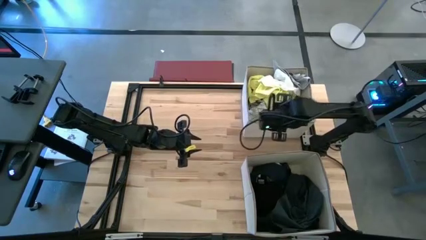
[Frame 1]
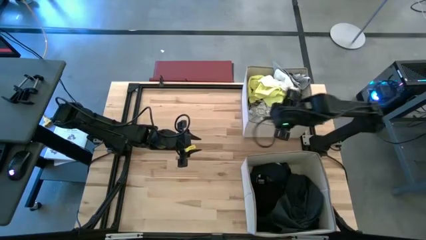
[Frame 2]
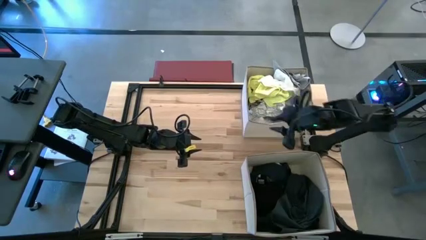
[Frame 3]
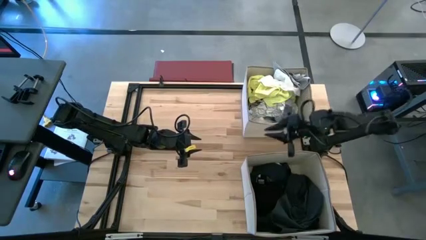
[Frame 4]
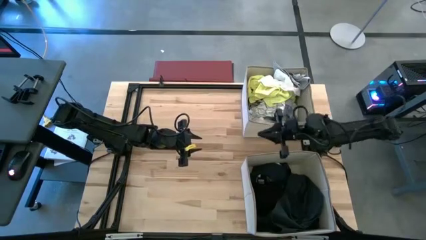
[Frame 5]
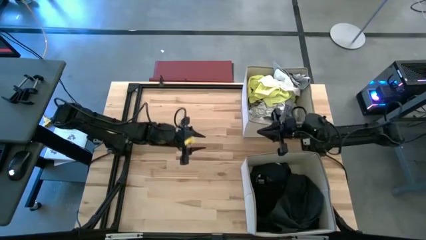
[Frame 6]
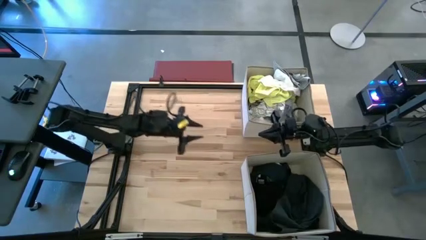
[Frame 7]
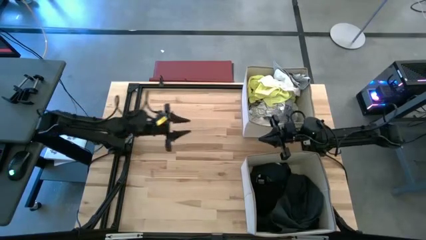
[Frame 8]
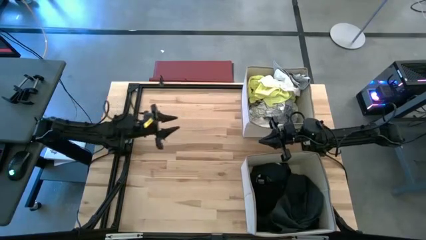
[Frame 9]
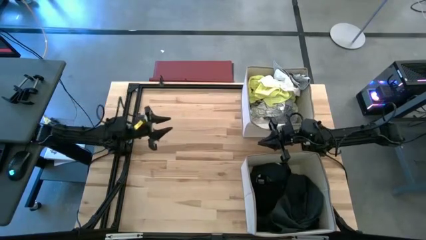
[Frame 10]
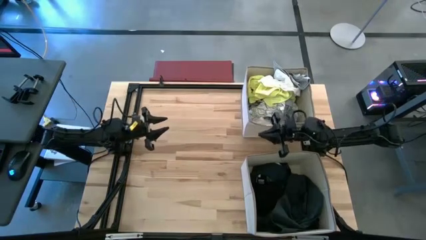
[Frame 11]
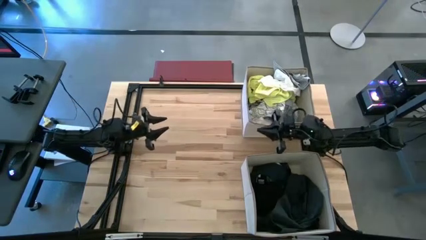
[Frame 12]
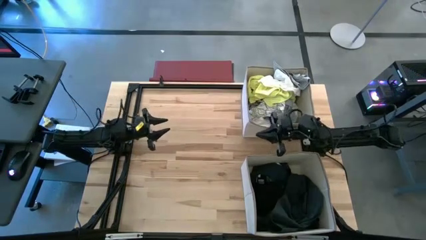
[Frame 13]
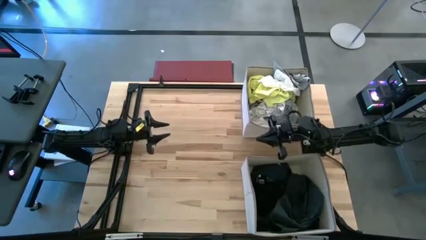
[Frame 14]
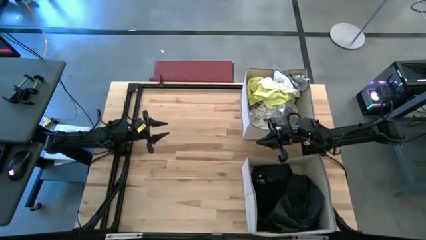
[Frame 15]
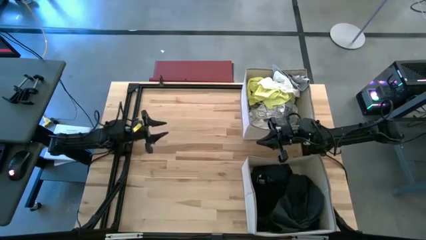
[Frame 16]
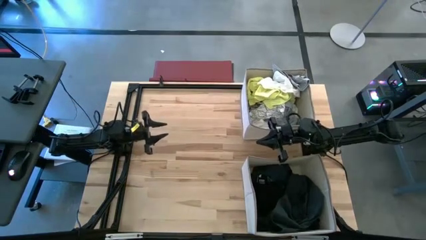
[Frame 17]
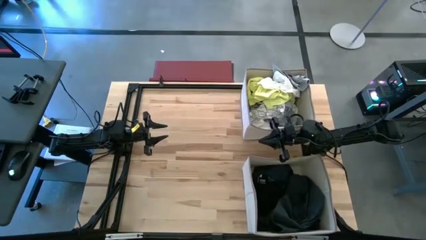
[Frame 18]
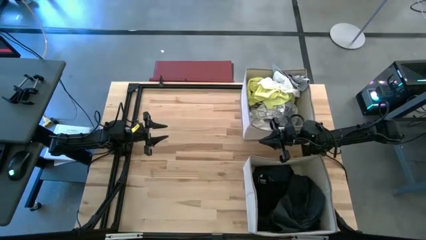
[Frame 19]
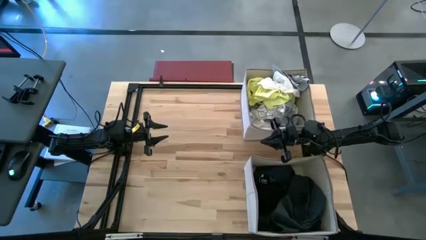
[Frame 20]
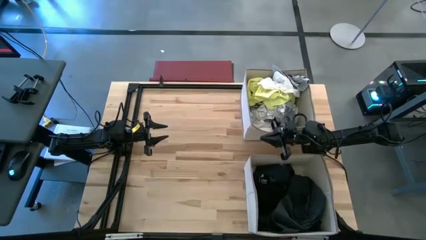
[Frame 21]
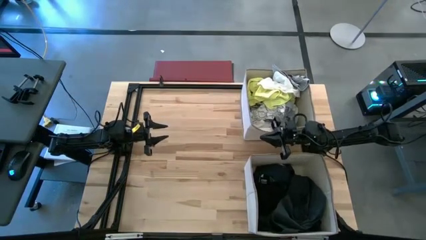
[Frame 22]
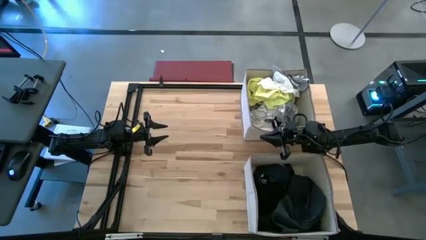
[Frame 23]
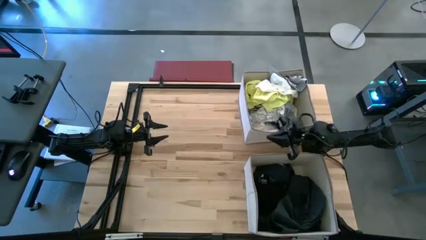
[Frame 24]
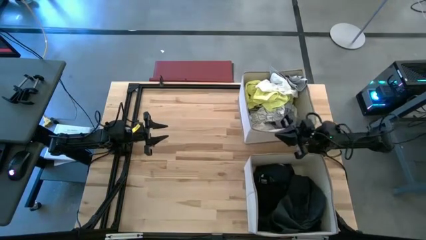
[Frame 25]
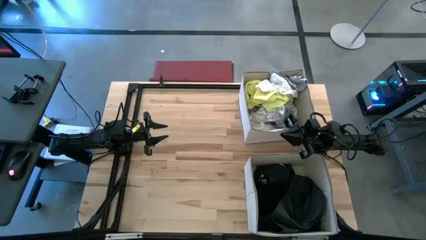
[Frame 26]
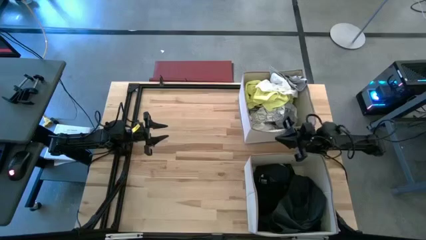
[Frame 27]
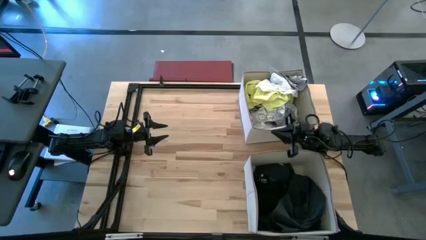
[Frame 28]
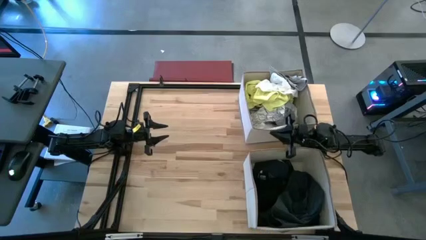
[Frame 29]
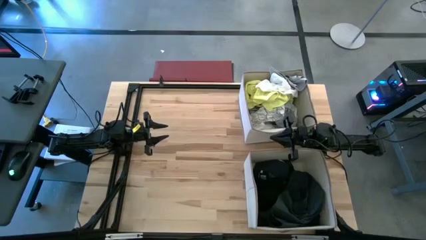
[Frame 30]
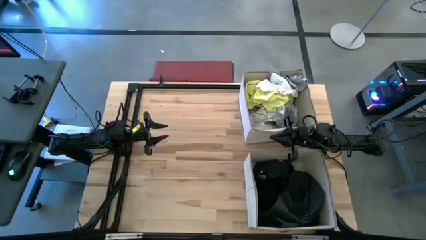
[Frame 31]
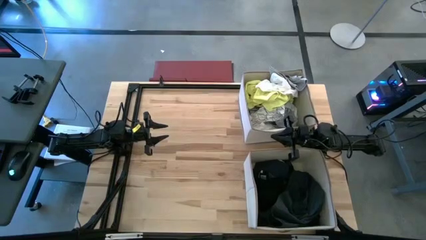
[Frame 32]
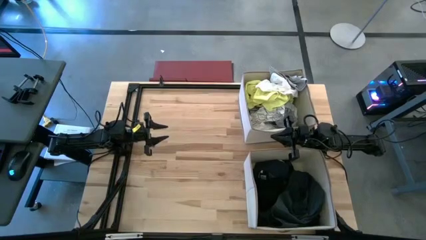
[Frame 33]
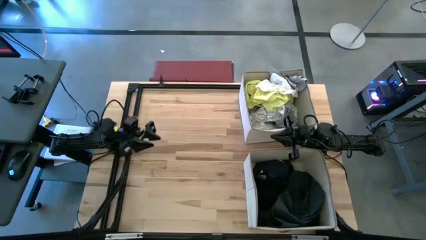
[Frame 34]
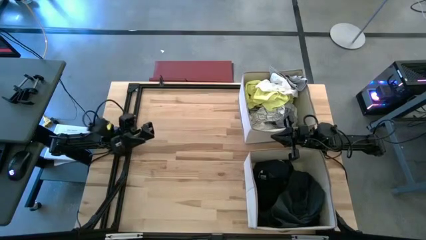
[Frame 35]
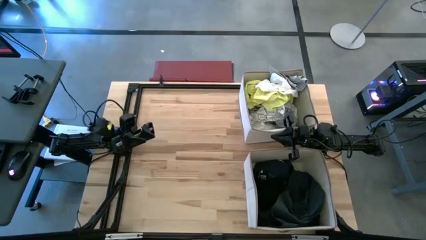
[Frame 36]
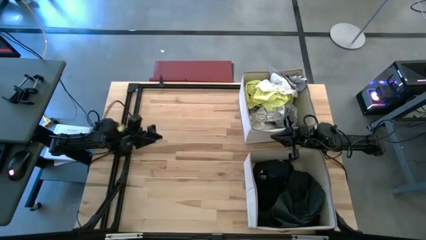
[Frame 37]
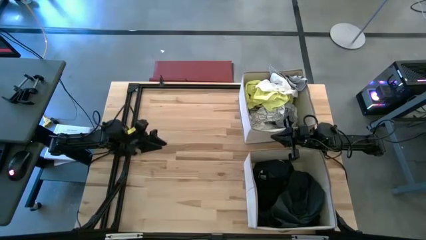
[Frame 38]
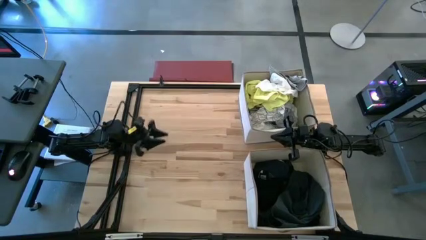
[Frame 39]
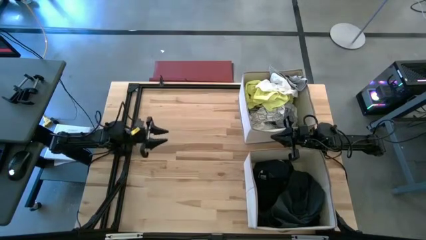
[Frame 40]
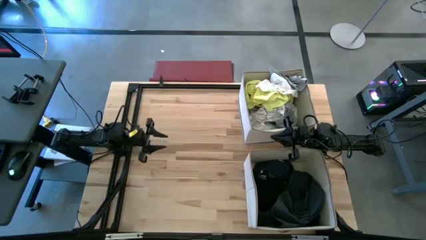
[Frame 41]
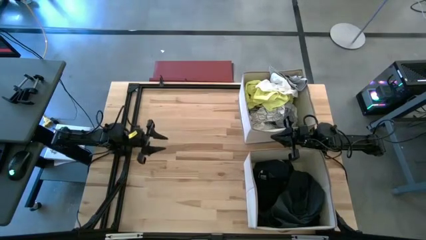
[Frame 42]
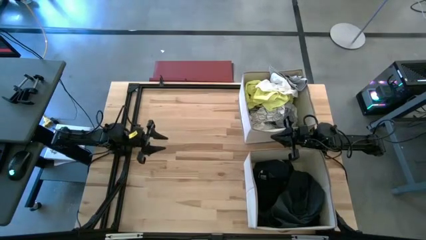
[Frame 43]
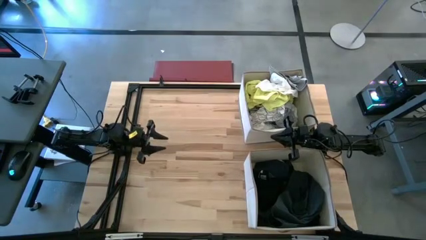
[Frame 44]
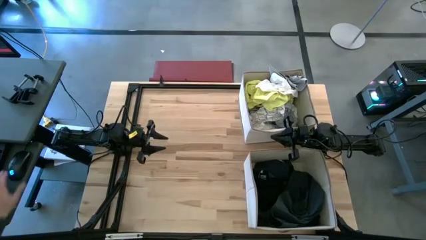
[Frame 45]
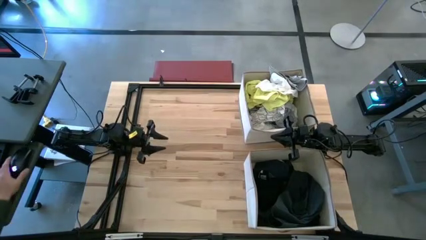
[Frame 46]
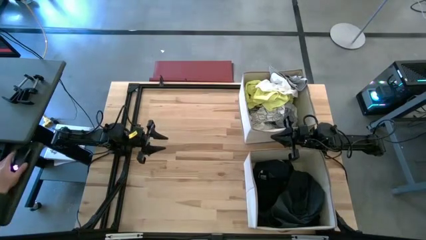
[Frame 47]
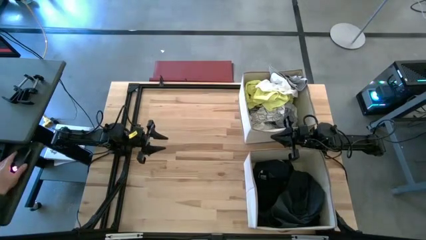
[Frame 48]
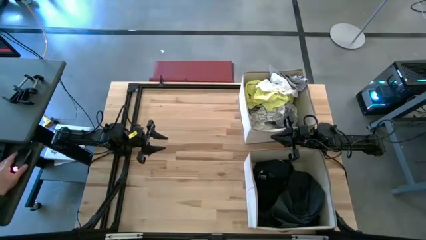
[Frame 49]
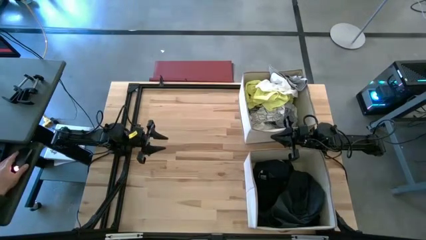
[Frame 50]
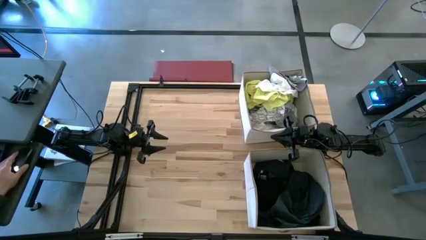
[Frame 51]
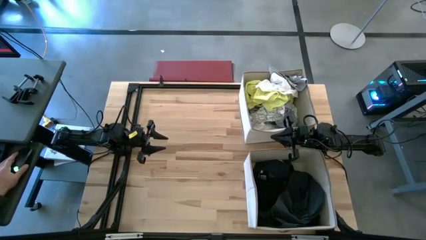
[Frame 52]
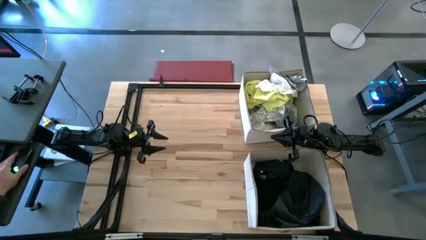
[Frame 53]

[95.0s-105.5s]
Task: Sort clothes
Return to Home Position

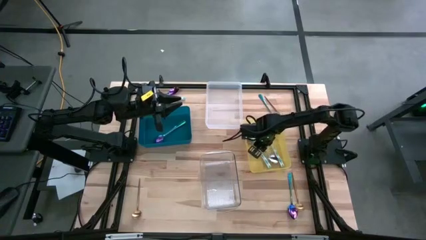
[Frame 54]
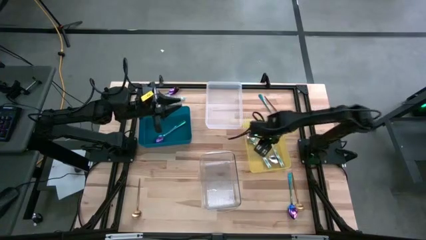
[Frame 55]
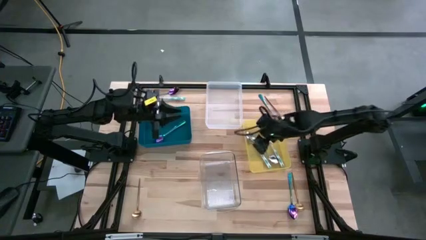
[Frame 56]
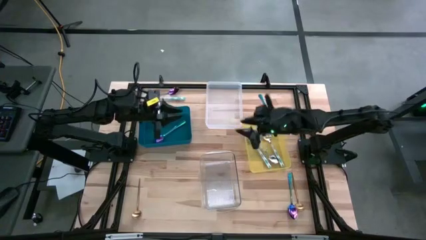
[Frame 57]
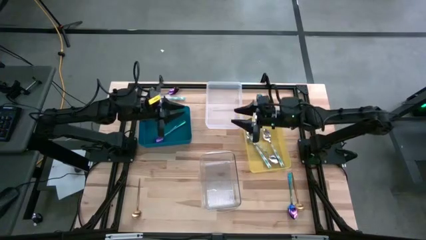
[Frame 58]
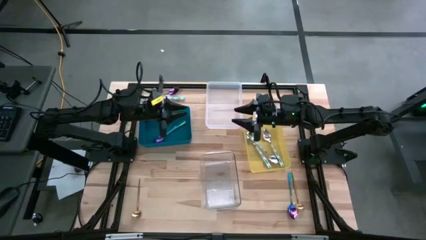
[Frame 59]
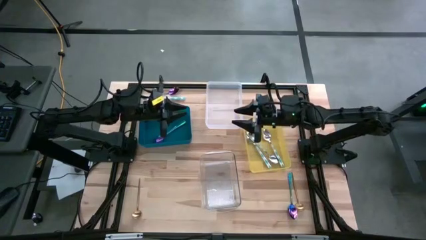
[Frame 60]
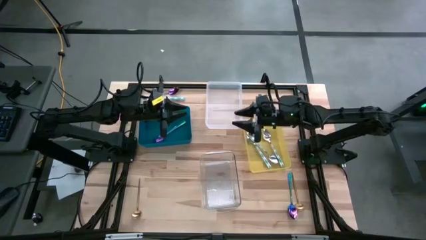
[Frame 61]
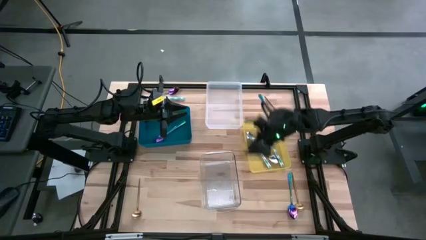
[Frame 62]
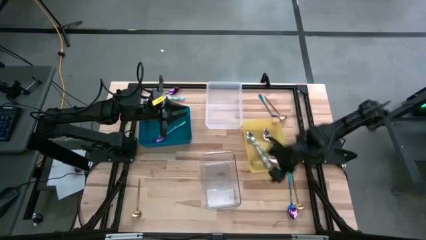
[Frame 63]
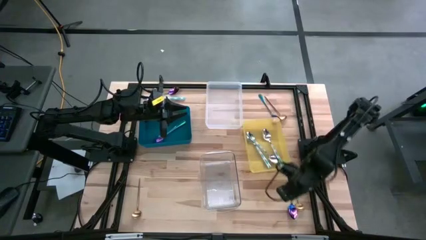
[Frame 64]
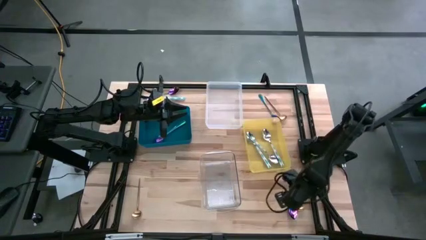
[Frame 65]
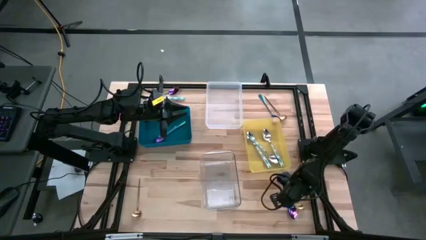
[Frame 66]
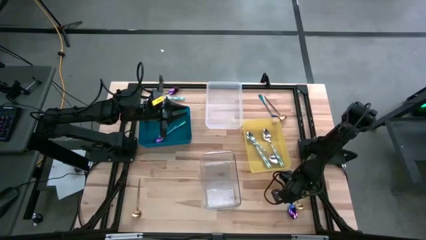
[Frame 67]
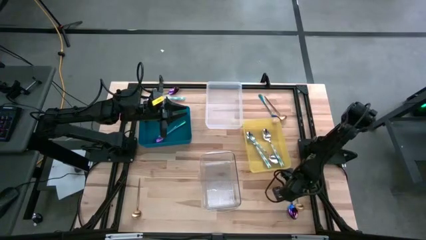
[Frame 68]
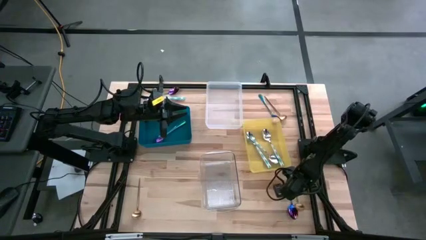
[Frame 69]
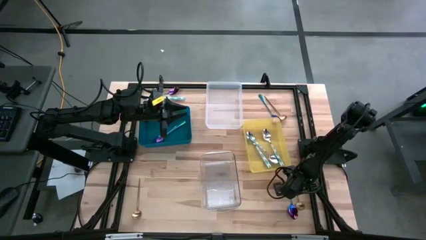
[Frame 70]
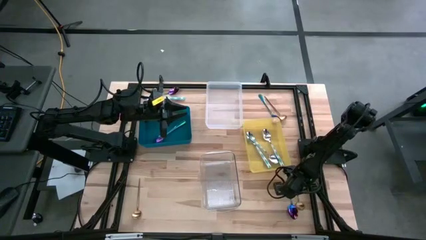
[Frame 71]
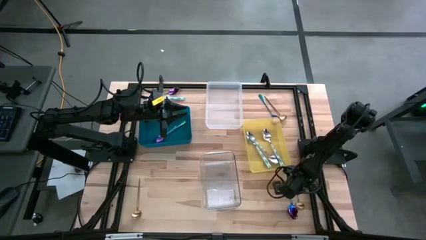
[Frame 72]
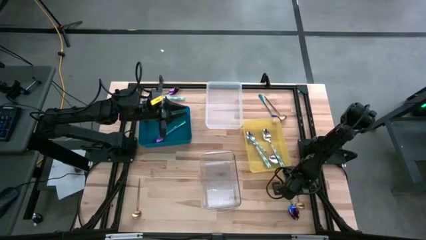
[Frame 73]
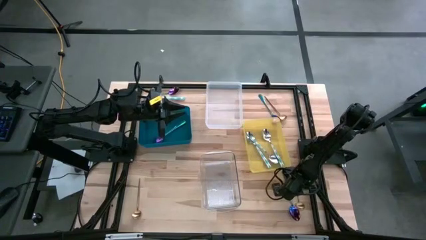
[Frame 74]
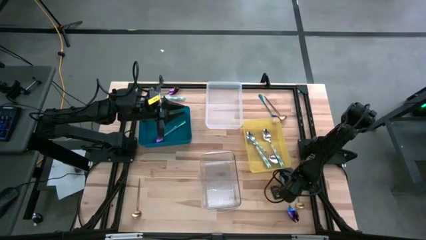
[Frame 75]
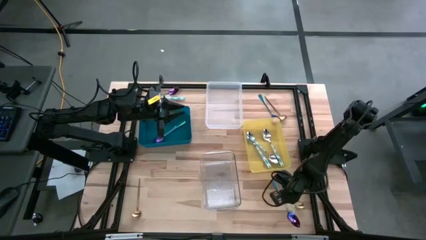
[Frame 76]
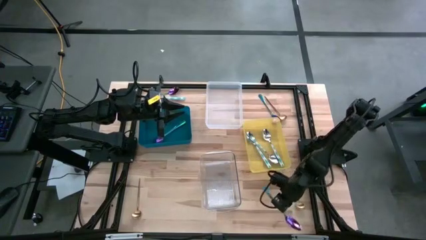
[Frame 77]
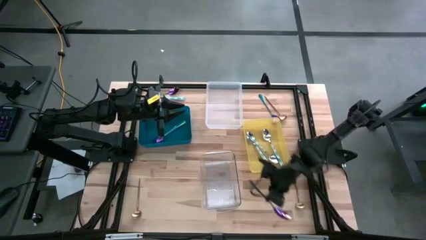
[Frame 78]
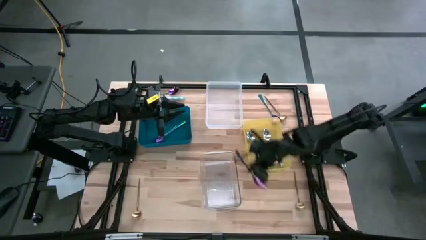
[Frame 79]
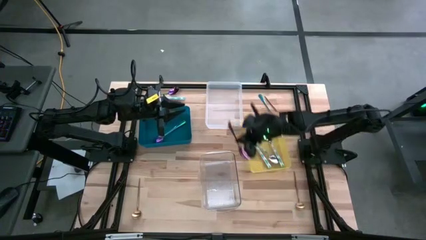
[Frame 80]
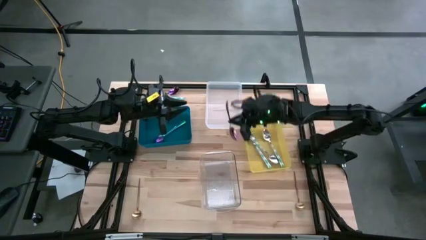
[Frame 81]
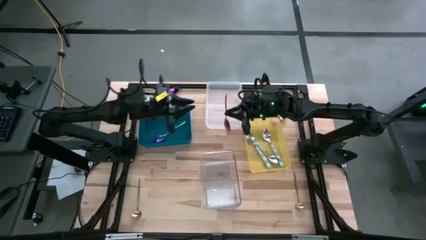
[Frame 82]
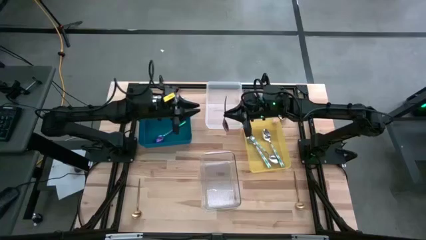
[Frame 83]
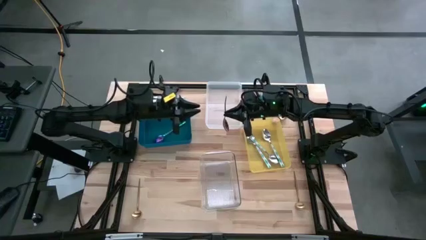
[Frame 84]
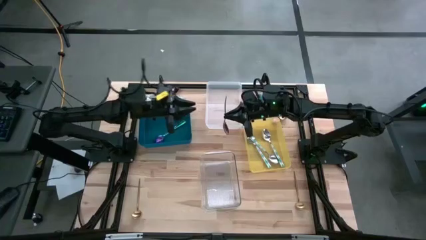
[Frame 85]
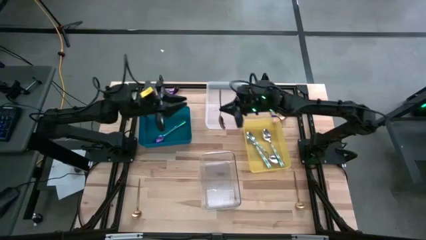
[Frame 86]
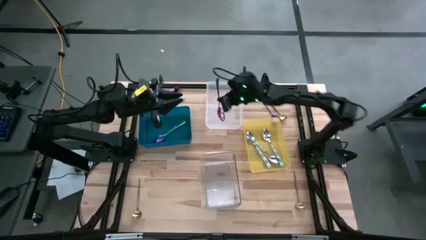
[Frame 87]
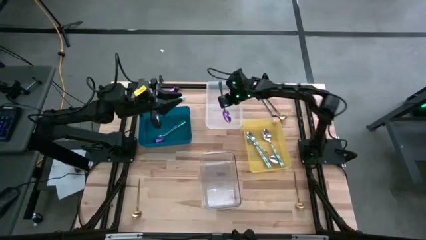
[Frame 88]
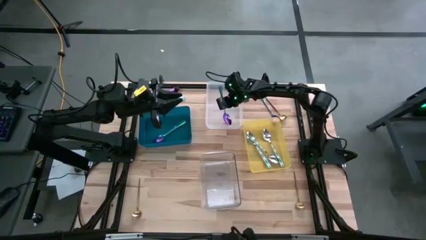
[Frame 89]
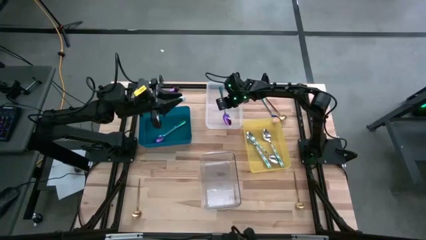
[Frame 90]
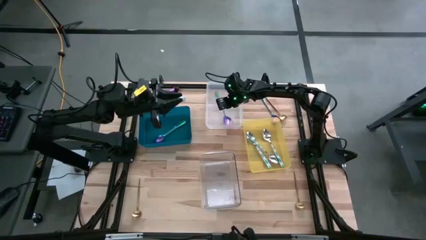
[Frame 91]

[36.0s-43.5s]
Task: Sort silverware by color (type)
Put the violet spoon into the white bin
